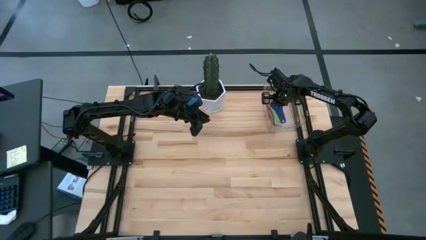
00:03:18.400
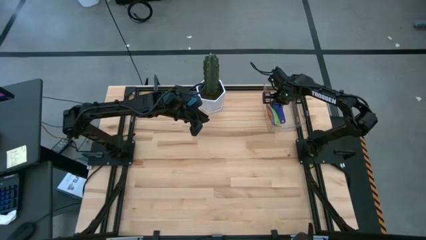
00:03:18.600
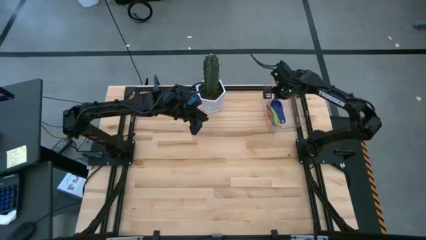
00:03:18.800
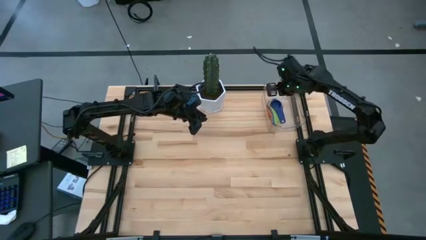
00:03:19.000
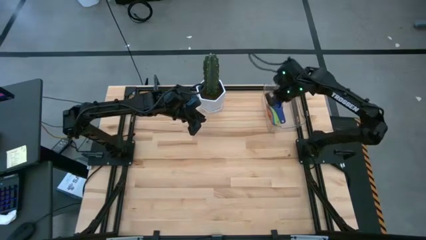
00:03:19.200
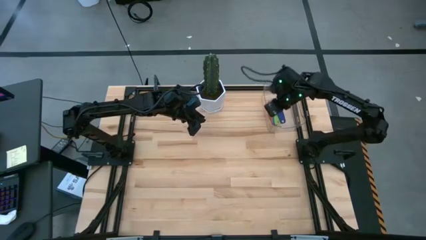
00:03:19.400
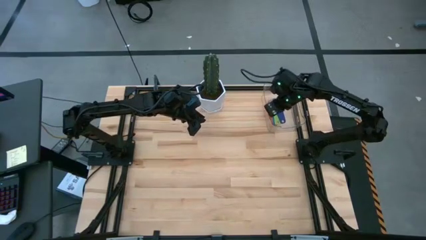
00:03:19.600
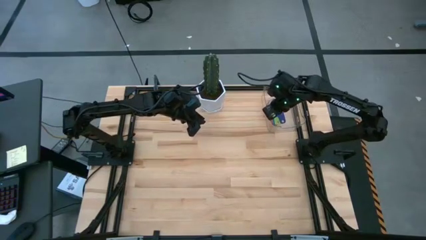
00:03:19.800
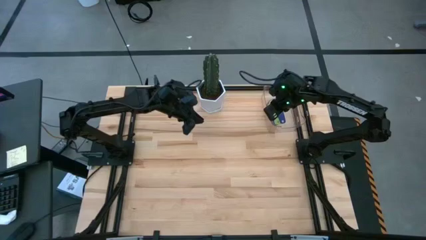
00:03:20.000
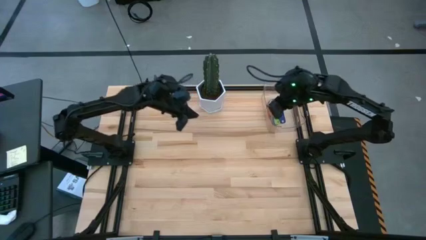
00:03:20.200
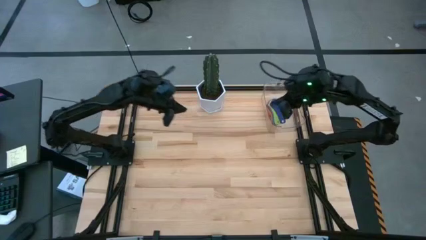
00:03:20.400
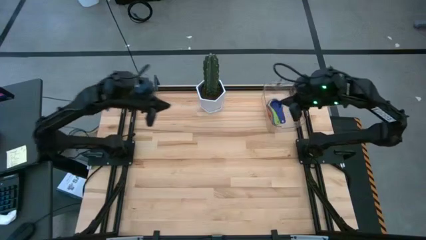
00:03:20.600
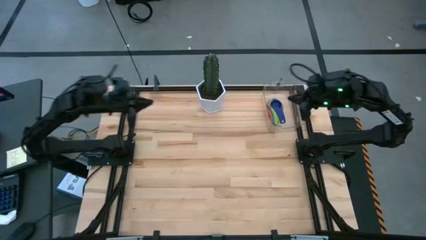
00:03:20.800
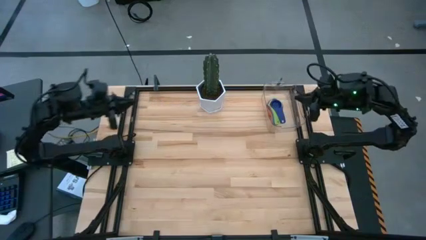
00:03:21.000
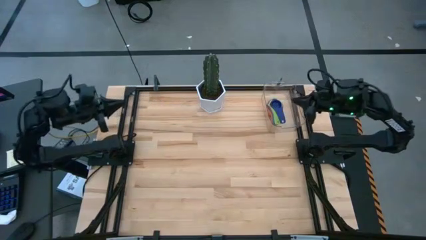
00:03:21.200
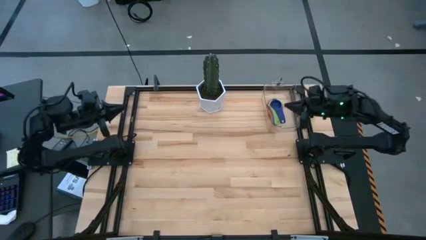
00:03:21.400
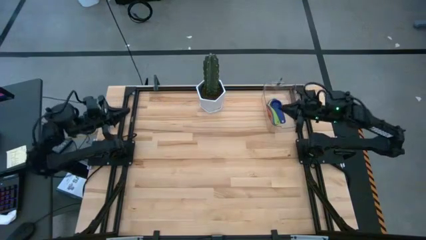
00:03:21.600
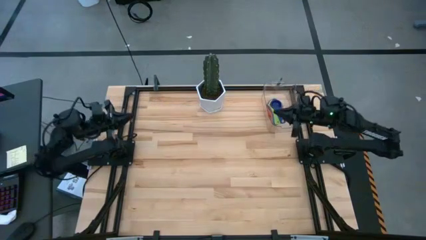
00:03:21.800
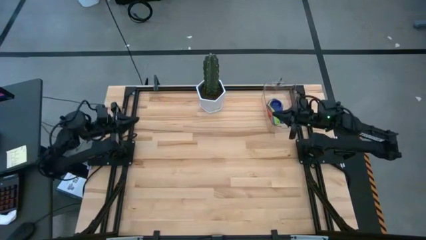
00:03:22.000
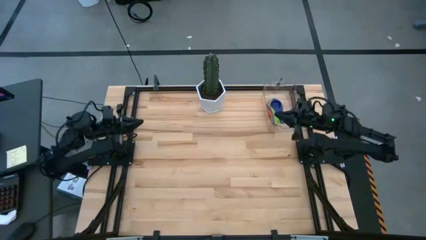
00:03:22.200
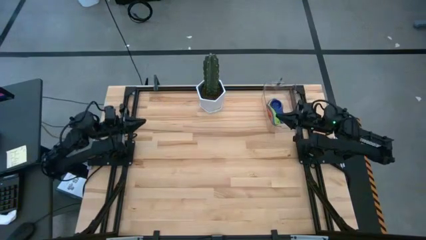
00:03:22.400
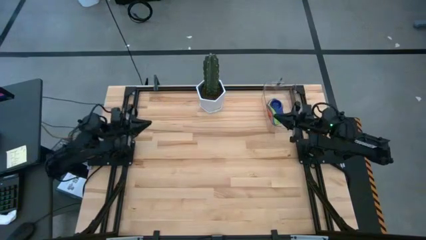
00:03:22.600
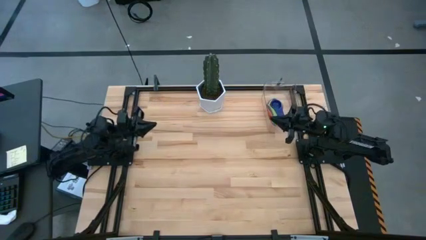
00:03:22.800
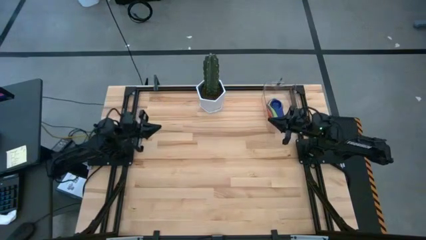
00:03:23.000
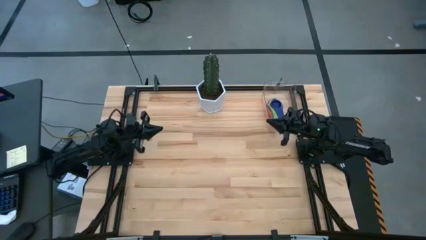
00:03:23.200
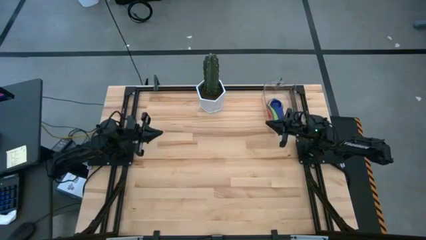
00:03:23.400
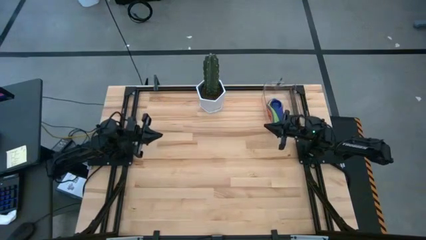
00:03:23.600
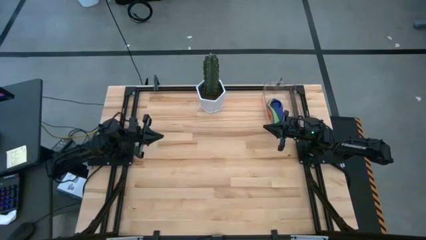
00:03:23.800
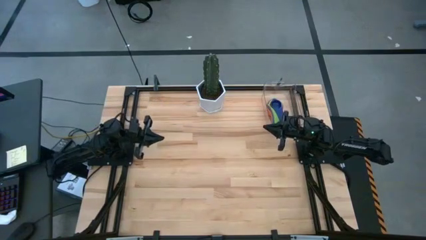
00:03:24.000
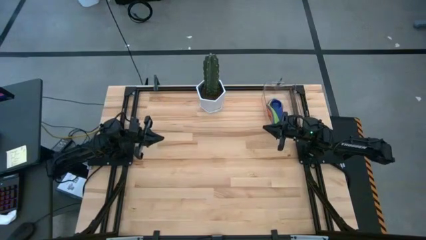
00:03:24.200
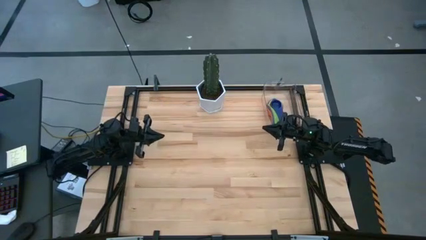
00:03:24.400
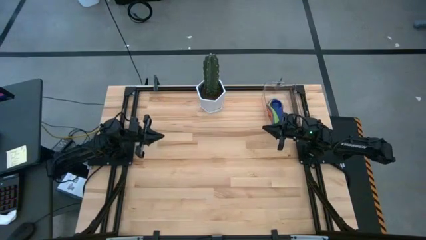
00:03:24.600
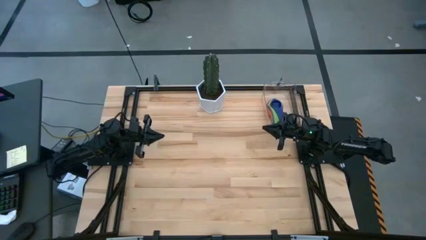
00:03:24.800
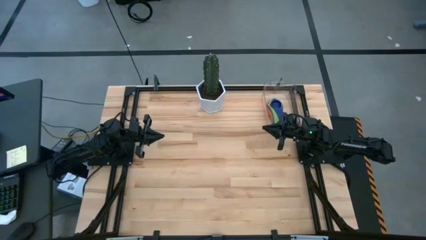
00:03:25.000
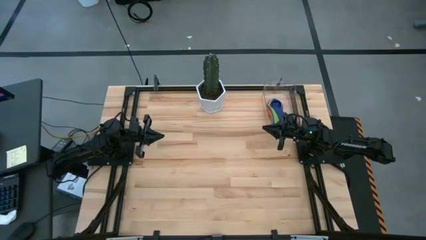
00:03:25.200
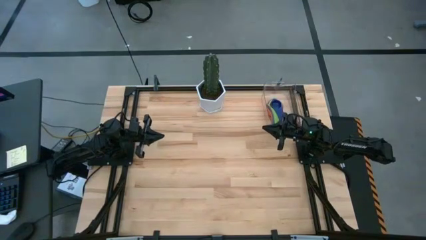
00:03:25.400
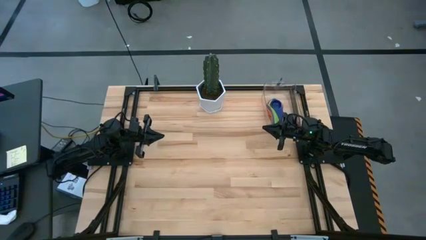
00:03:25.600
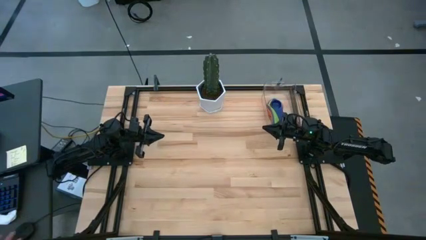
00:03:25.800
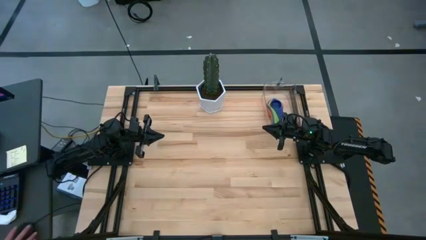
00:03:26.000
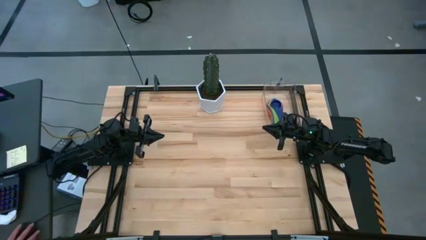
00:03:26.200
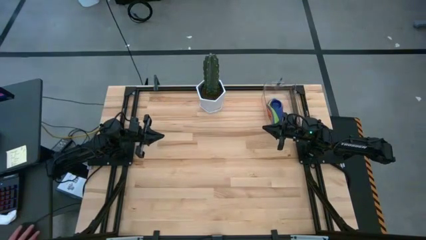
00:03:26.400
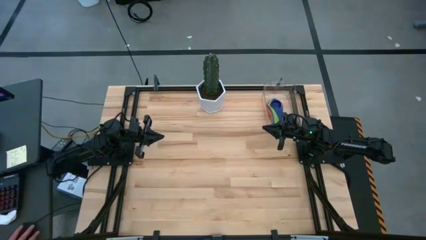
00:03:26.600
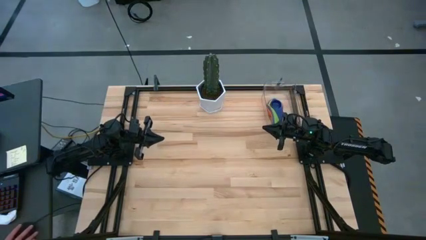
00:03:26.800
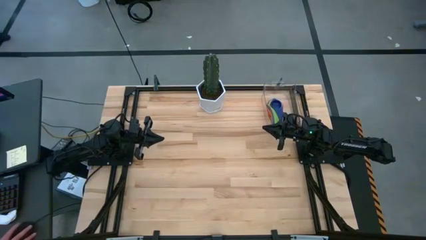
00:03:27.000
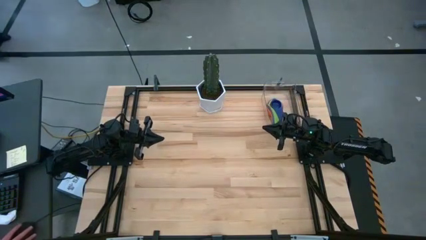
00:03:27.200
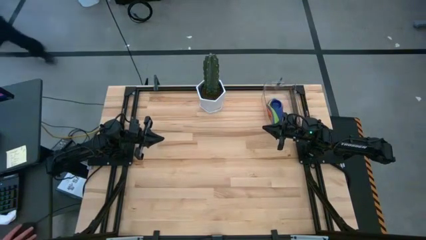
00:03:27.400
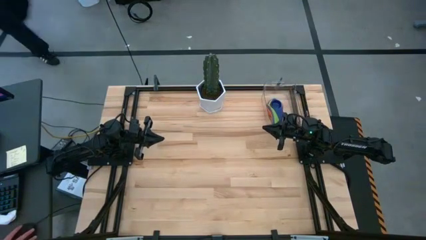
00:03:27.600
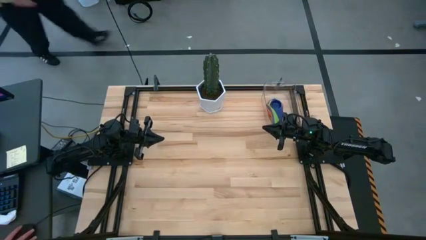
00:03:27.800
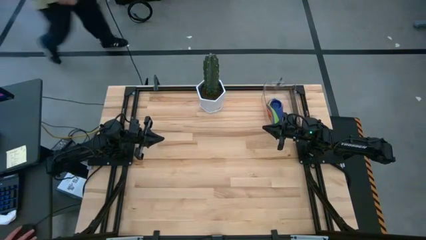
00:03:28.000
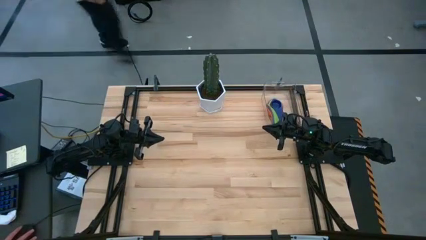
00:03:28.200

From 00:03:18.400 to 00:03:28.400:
Task: Nest measuring cups in basket
Return to Home Position

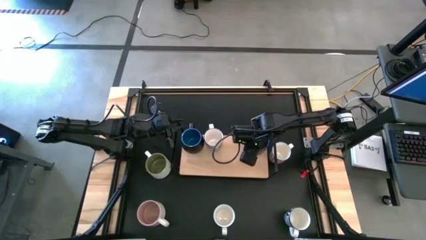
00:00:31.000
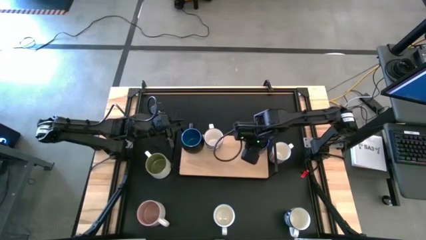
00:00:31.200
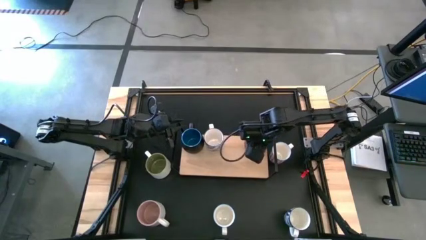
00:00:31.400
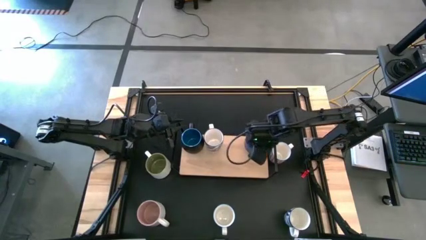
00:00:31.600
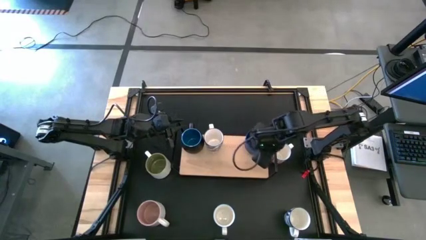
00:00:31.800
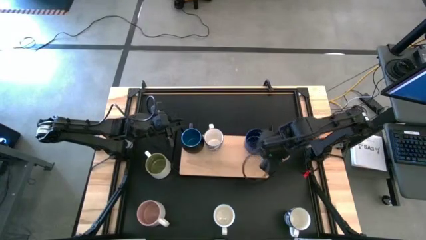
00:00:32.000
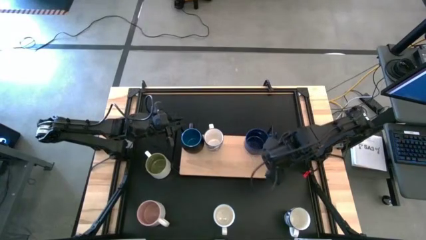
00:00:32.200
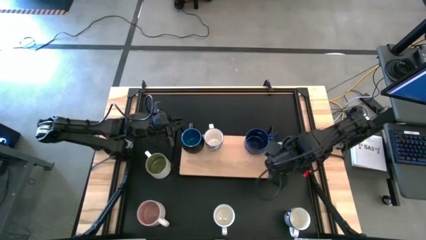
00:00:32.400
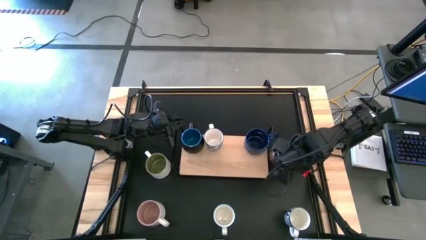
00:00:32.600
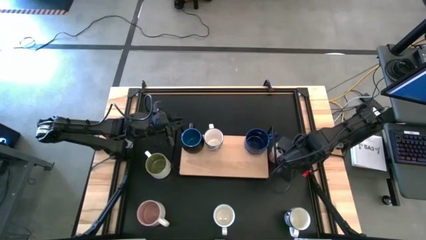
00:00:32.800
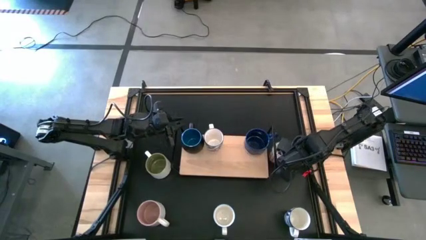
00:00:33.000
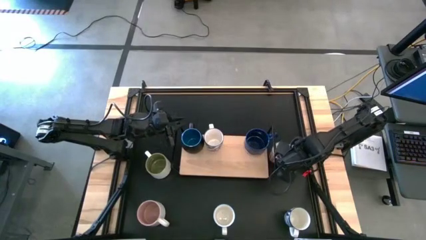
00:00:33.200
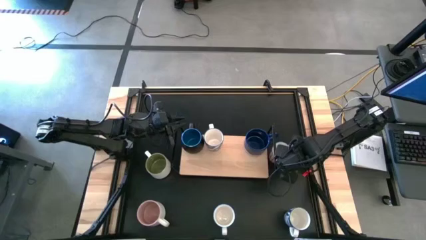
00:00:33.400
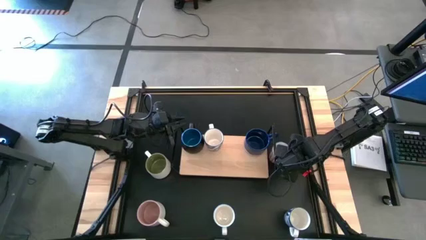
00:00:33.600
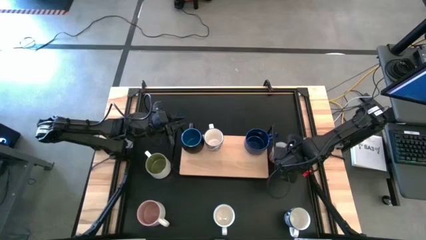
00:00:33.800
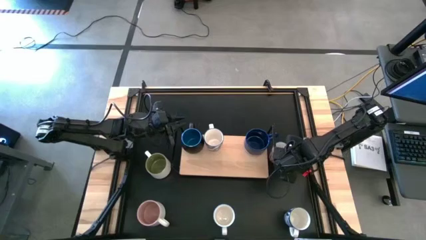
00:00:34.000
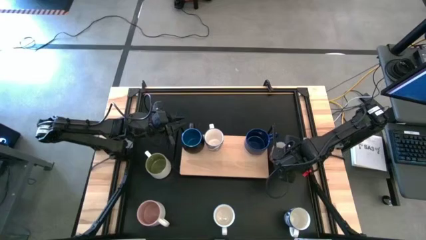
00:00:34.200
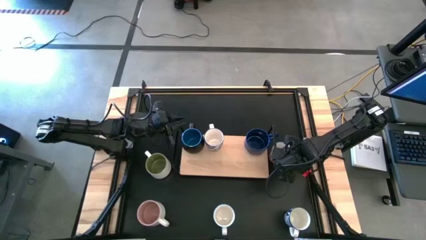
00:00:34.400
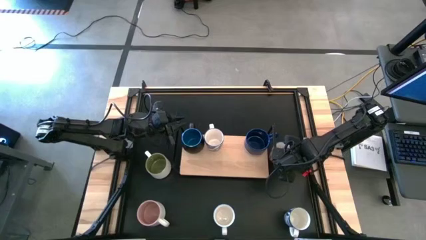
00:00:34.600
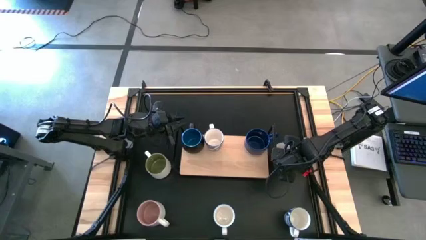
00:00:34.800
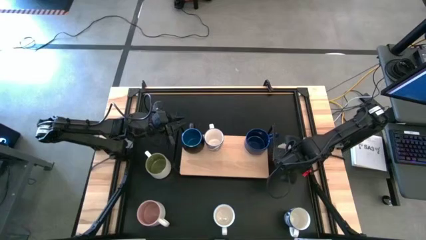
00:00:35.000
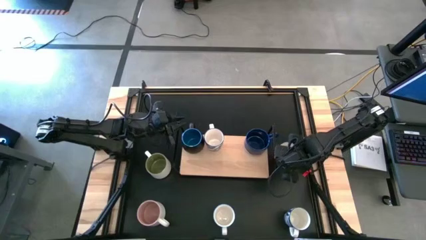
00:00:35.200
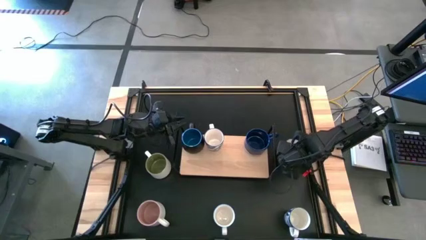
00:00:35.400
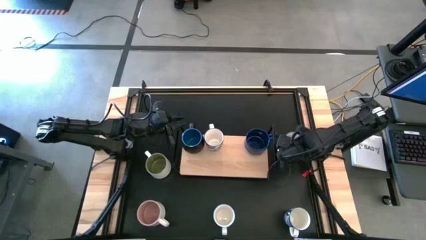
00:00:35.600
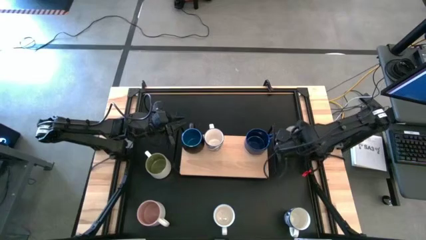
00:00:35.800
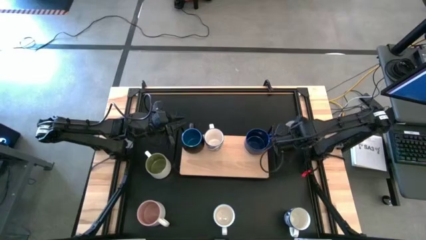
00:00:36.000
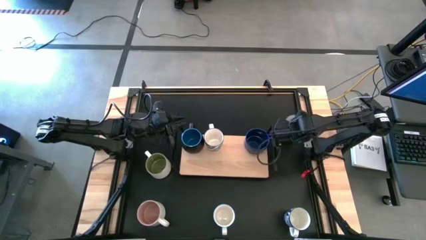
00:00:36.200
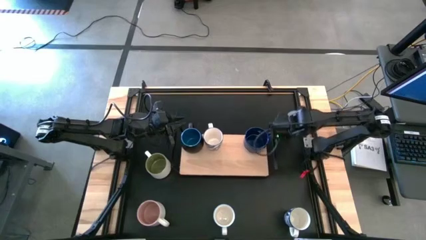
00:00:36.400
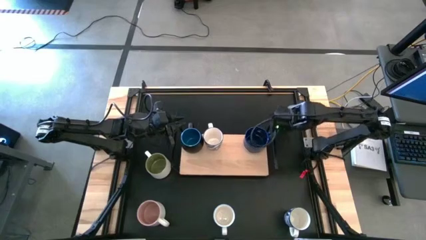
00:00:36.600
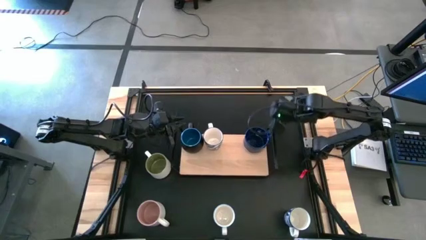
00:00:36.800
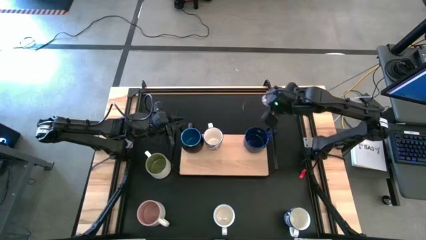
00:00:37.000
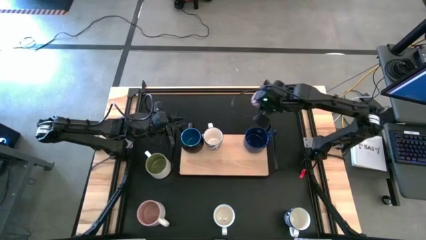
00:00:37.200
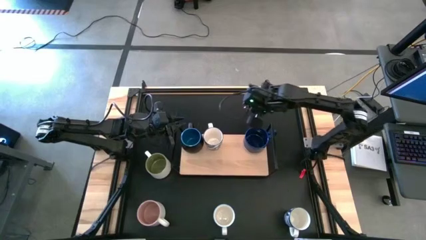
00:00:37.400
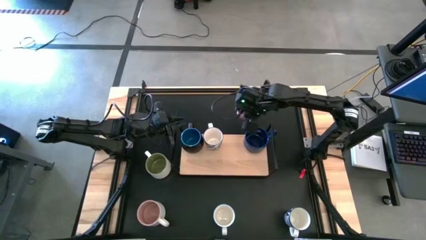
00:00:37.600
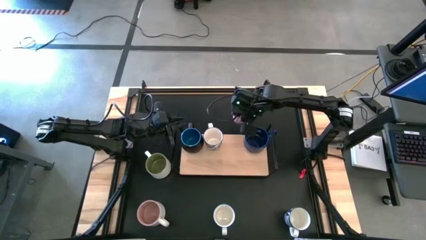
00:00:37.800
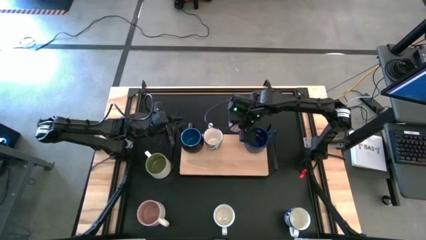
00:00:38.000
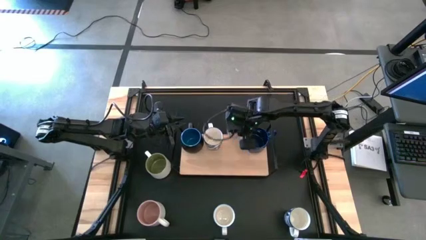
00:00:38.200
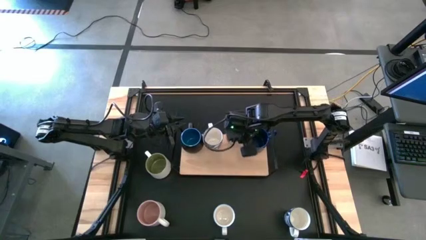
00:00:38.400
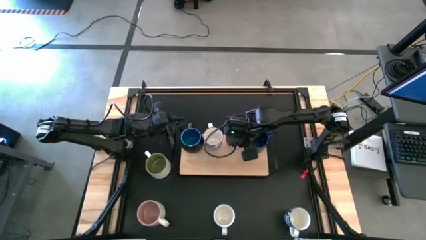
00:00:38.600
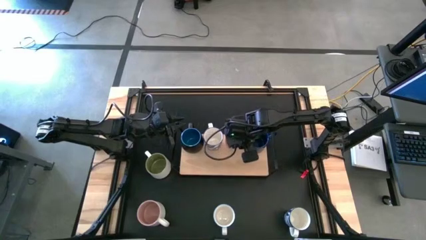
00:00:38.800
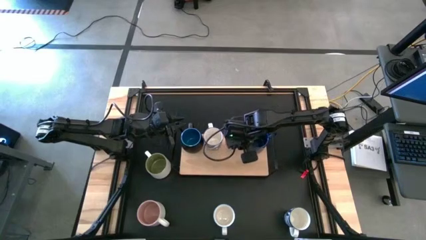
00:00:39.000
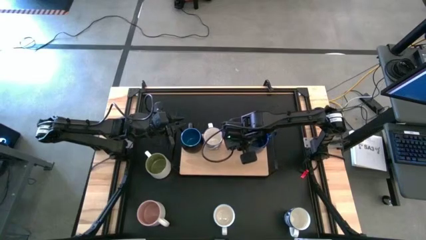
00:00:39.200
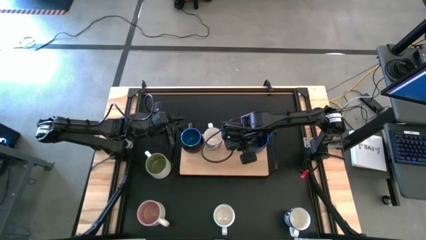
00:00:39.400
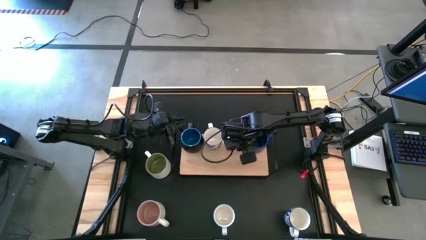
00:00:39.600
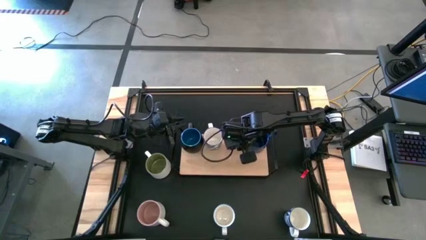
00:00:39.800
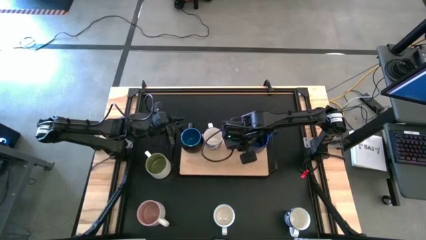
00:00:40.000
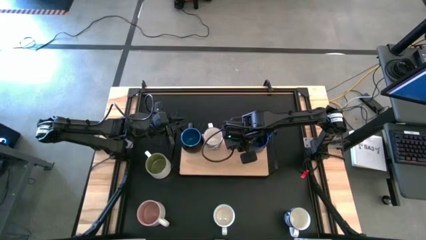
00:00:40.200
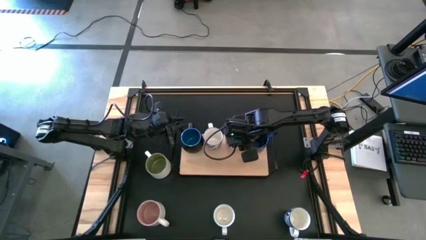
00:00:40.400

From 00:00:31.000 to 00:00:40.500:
Task: Place coffee mugs
Put the red patterned mug on the shelf
